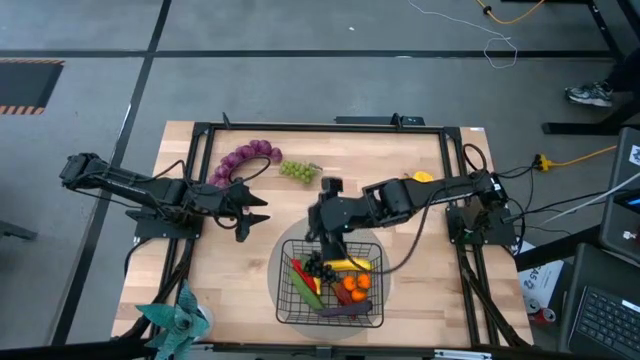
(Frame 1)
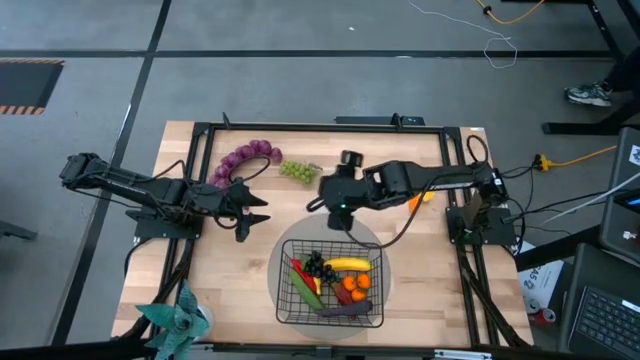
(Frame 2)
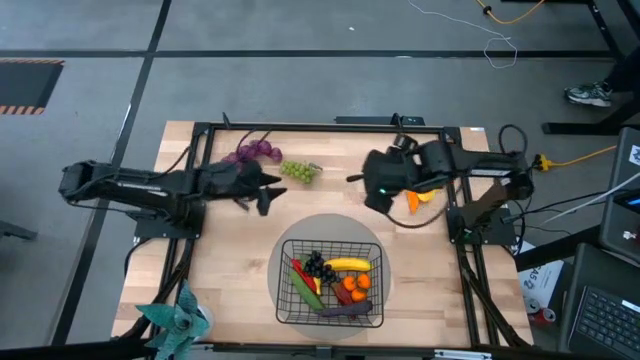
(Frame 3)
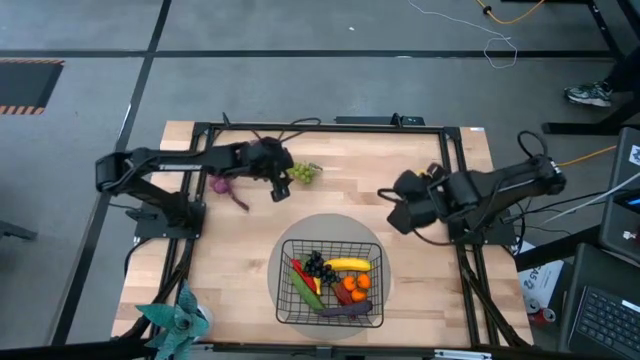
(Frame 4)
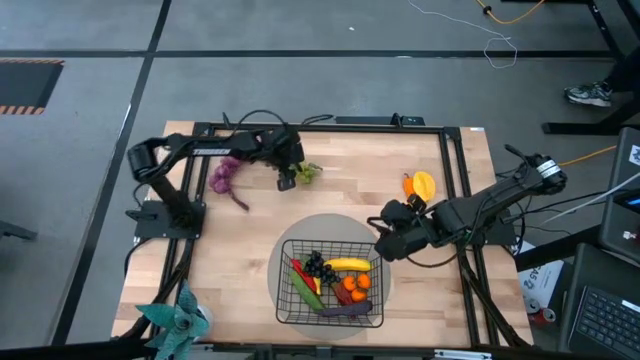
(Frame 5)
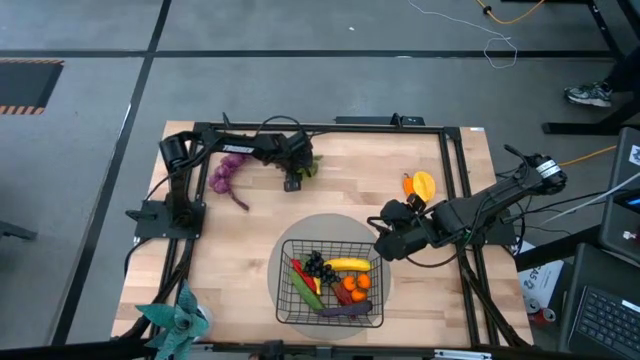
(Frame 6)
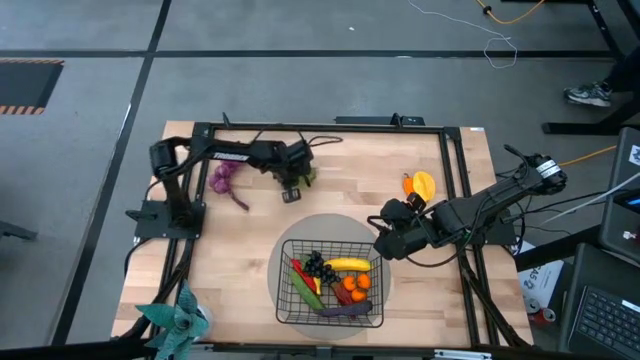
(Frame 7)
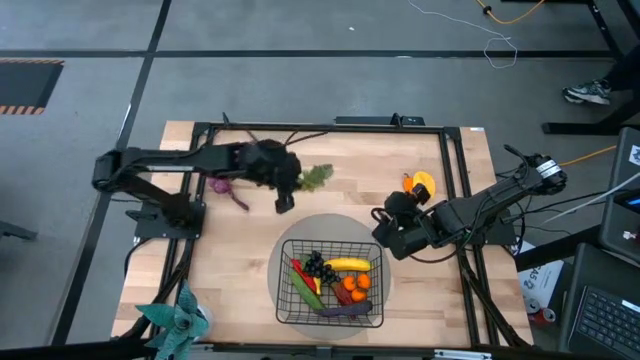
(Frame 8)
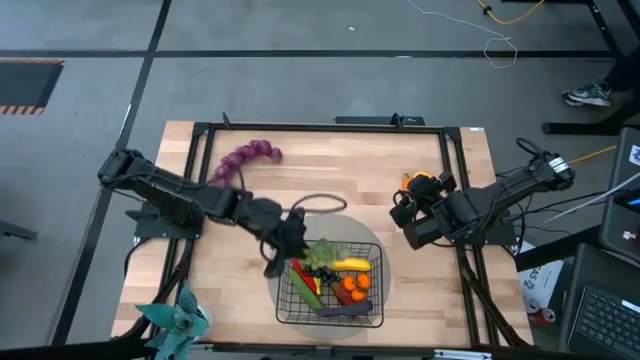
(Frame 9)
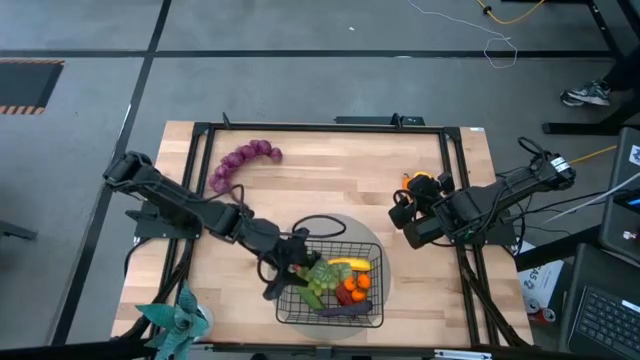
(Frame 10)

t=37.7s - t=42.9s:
Task: Build produce basket
Put the green grapes into the wire basket

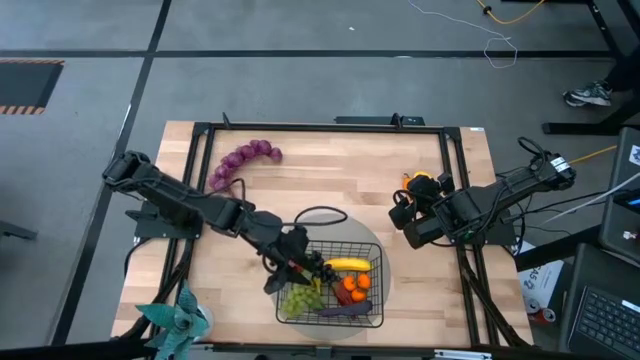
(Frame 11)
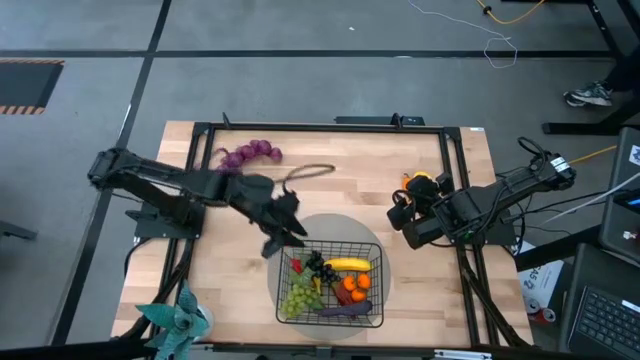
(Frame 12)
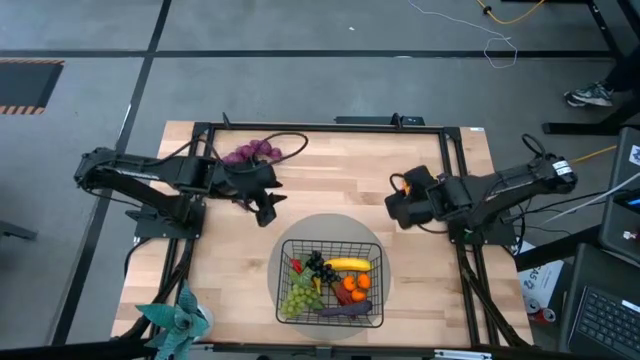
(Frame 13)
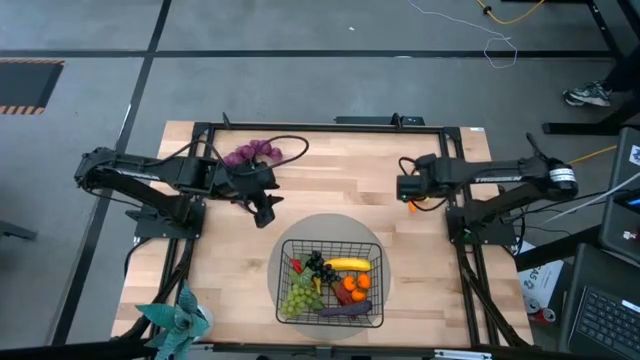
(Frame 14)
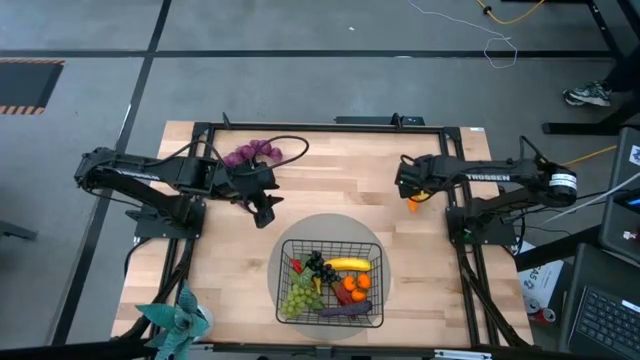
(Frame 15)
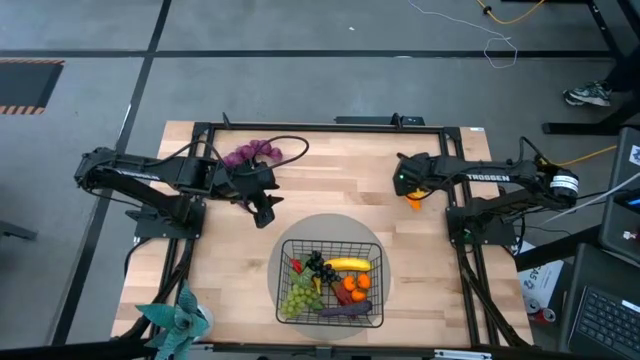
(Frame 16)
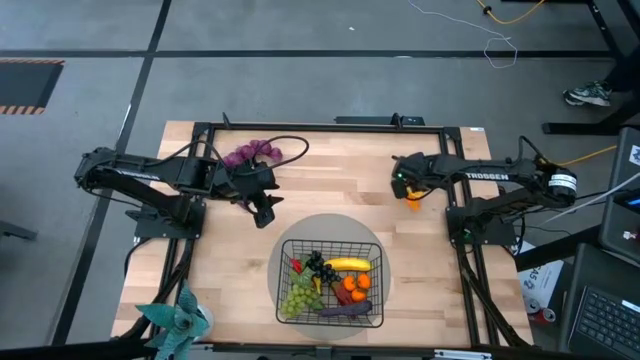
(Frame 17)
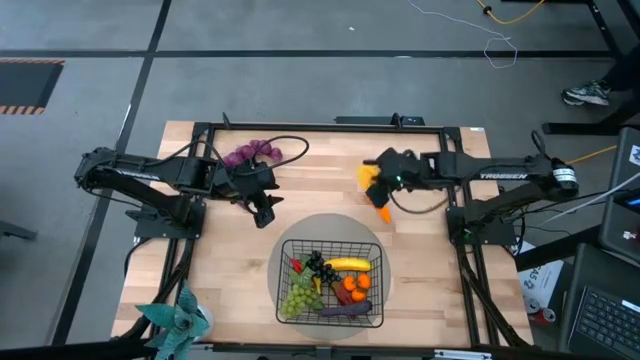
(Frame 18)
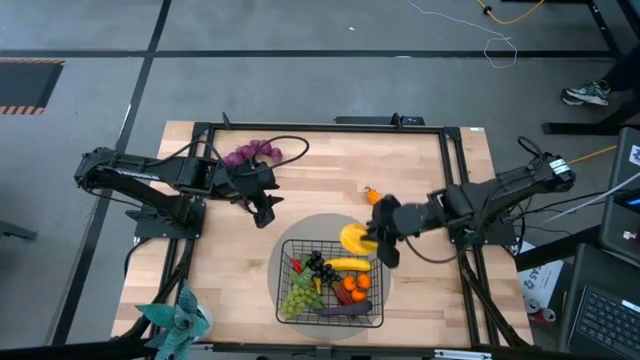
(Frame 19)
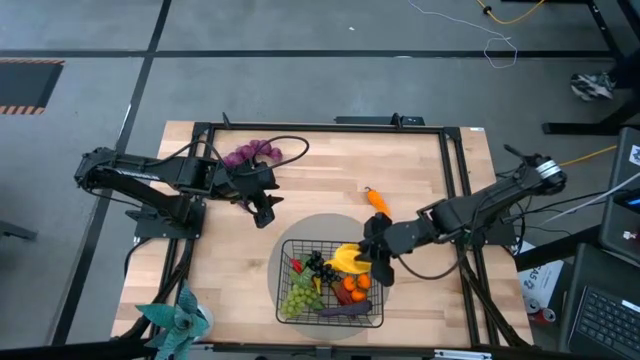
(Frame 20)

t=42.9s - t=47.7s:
Put the starfruit into the wire basket

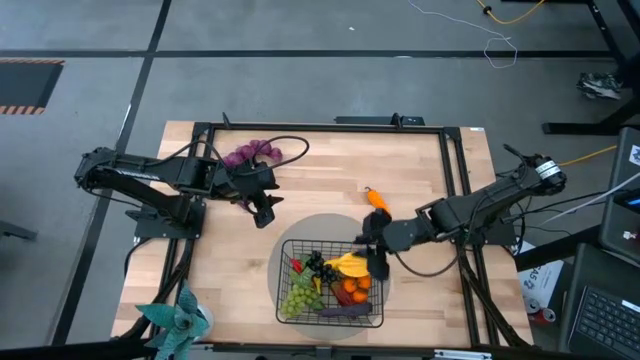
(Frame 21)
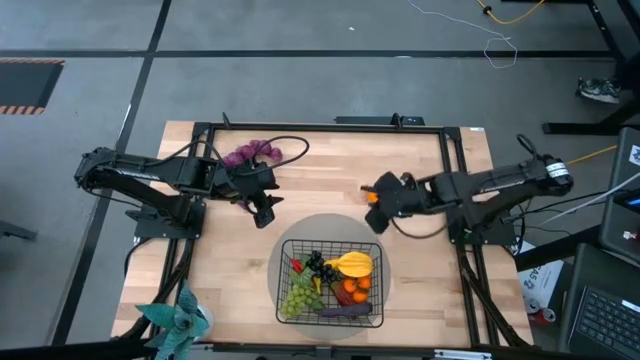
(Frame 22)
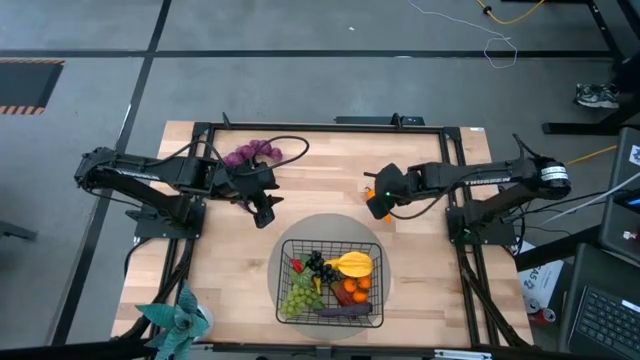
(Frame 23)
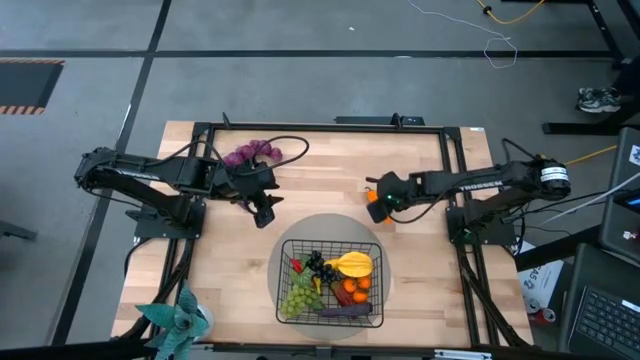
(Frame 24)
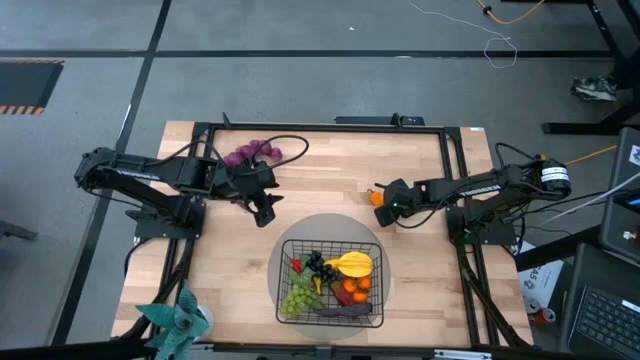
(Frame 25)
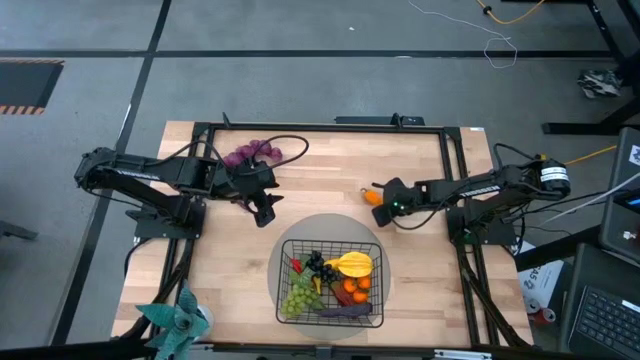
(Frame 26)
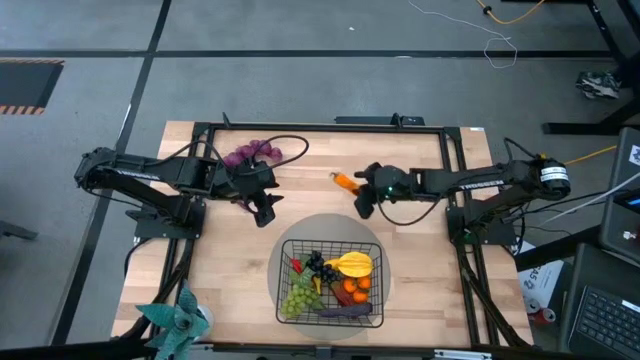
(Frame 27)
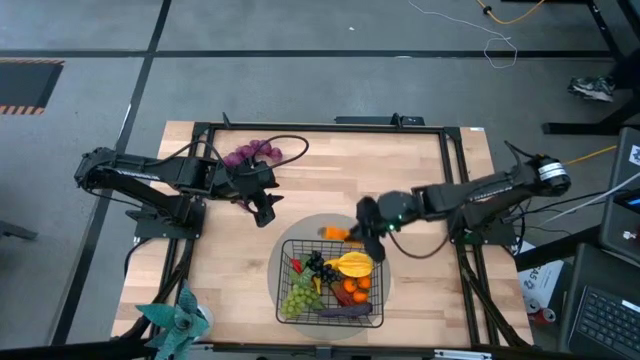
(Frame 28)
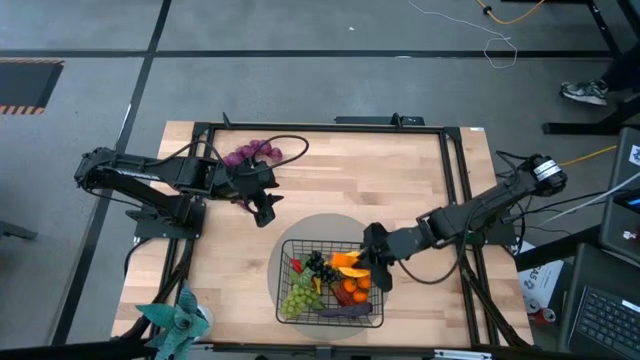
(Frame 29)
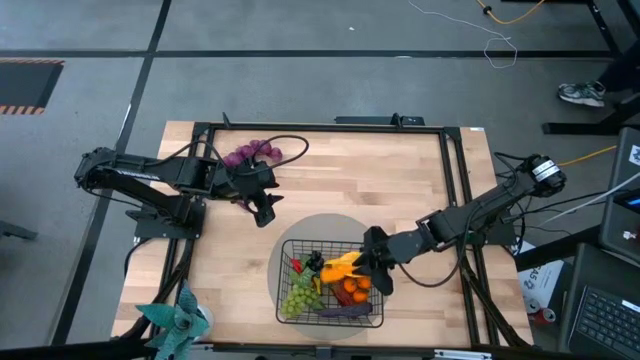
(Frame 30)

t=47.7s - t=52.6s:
Put the orange chili pepper into the wire basket

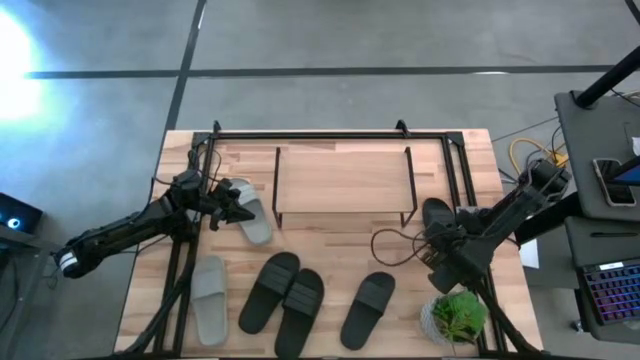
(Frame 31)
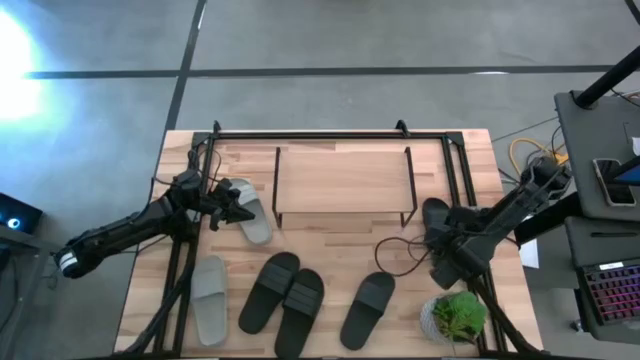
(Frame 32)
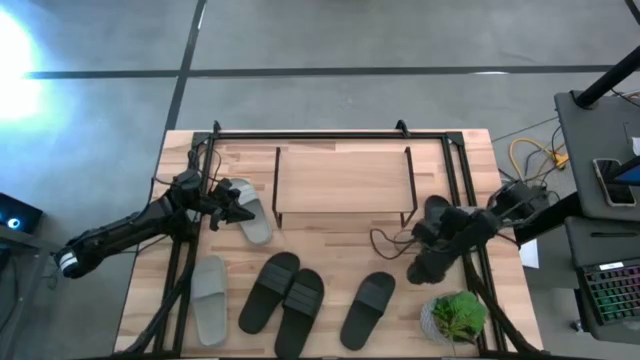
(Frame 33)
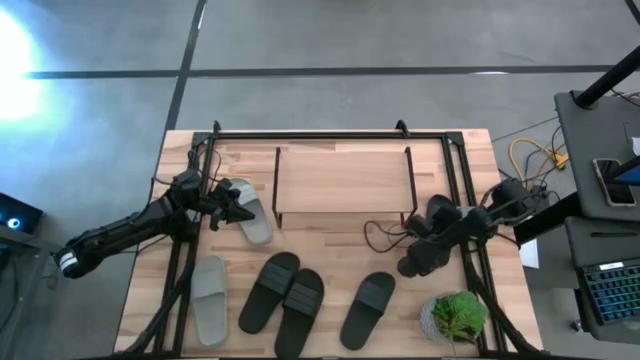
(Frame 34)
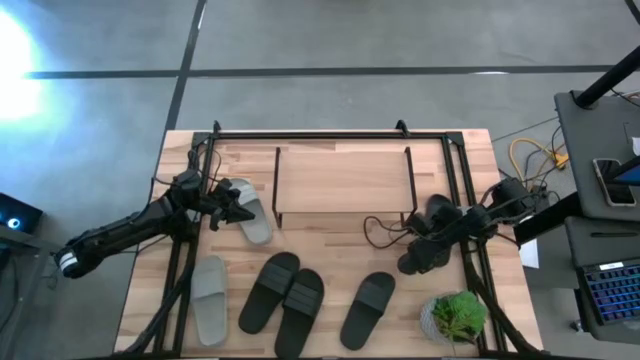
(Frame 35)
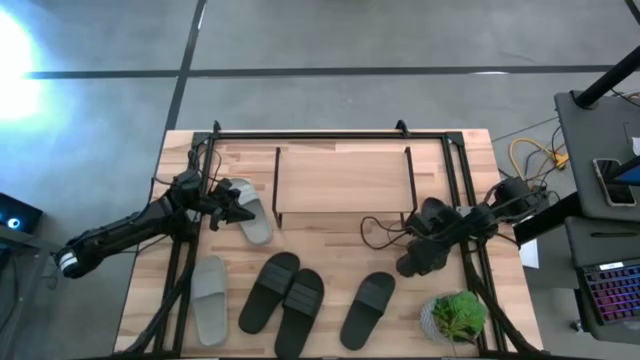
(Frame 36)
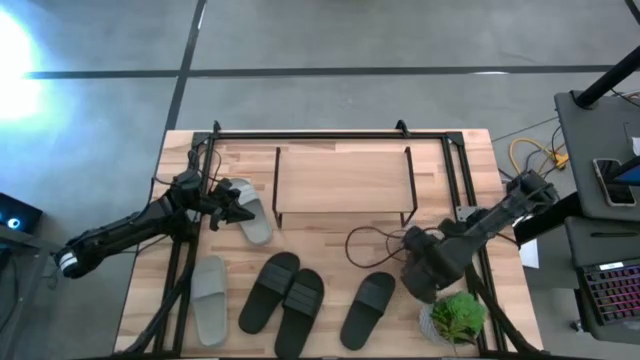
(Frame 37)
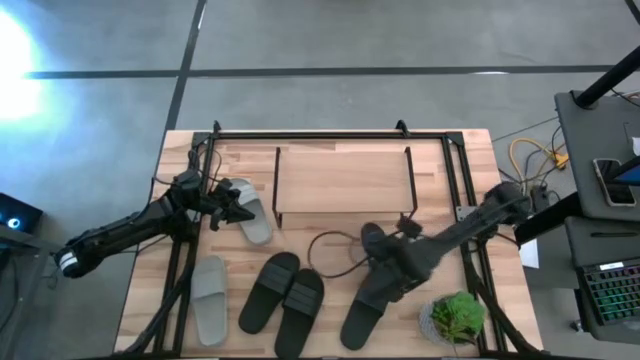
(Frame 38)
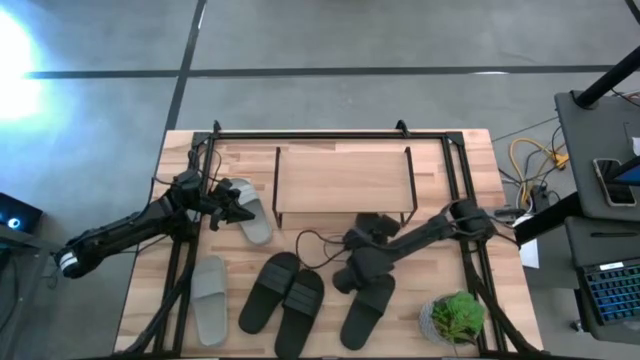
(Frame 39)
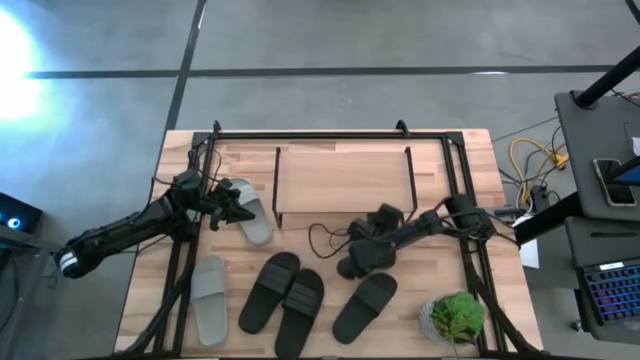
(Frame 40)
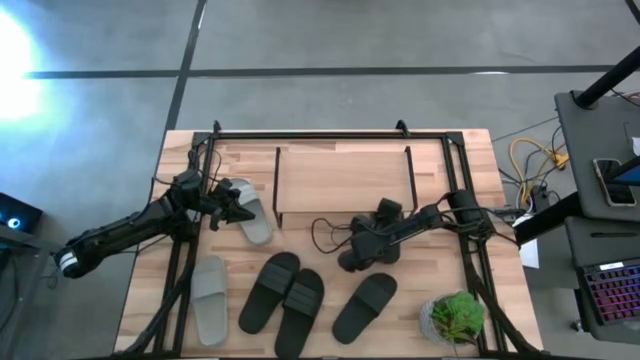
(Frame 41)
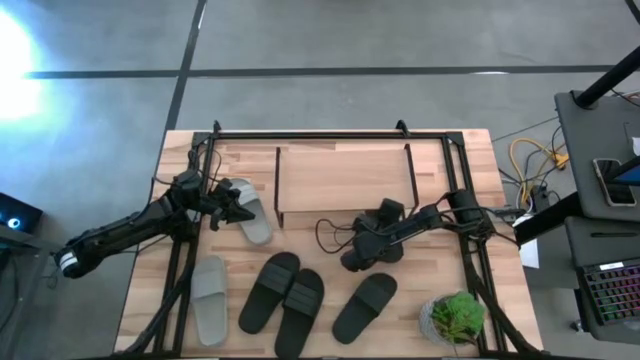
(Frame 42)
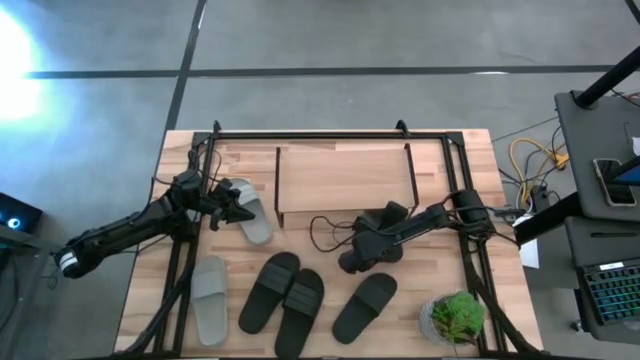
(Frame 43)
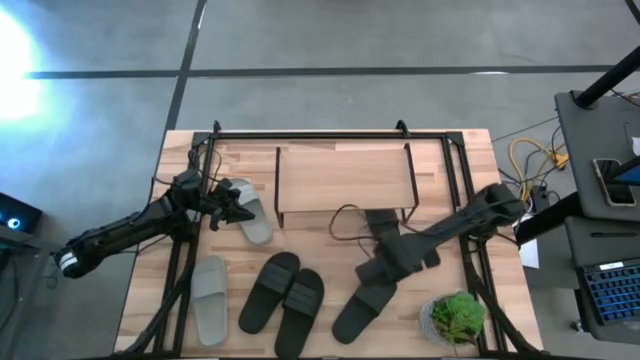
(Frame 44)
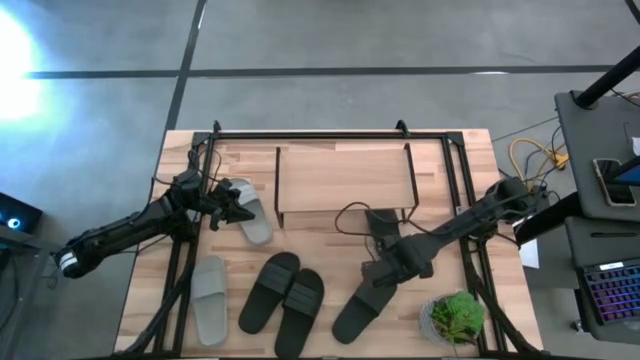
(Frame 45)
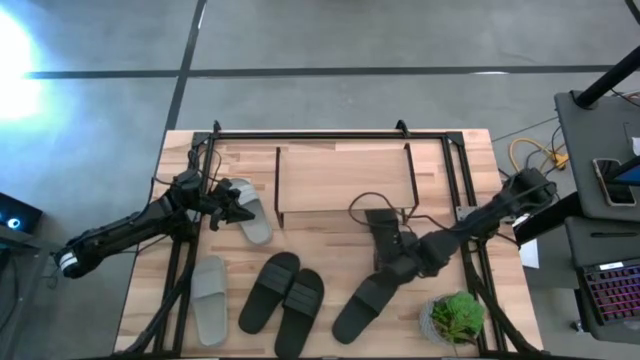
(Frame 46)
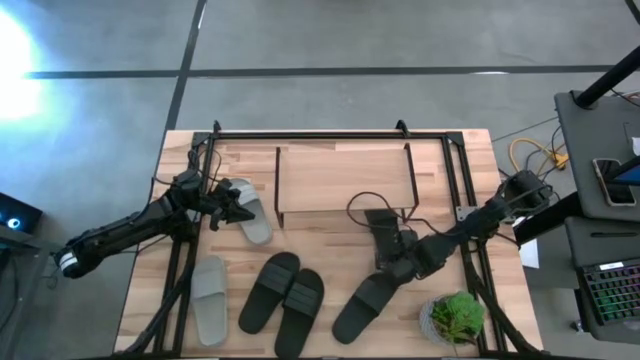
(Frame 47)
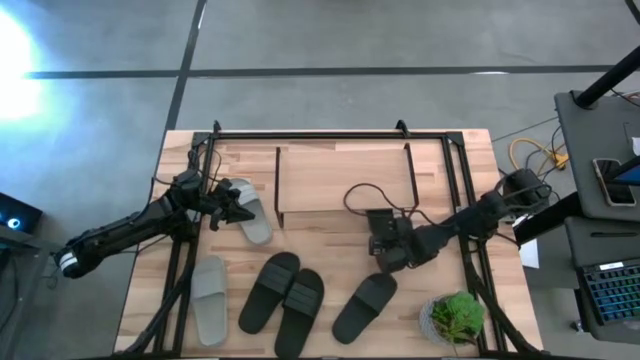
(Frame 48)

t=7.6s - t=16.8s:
Task: Pick and place slides into the shelf
Put the black slipper under the shelf
